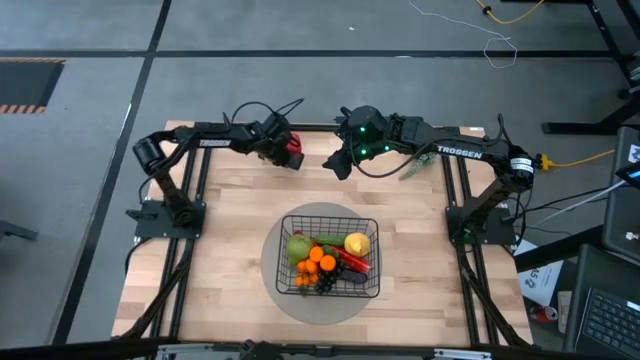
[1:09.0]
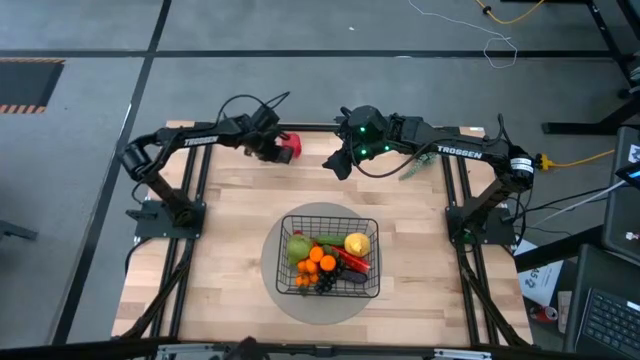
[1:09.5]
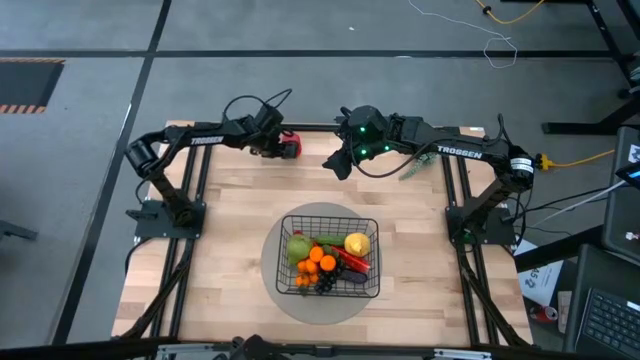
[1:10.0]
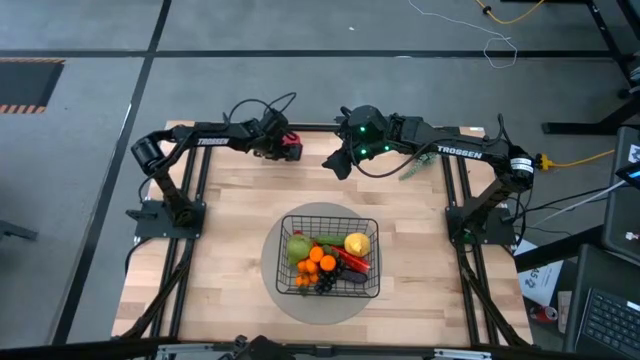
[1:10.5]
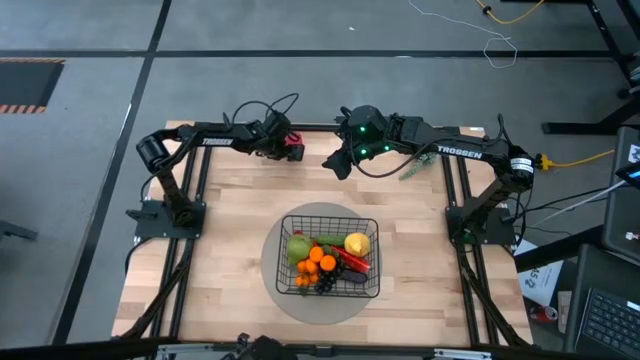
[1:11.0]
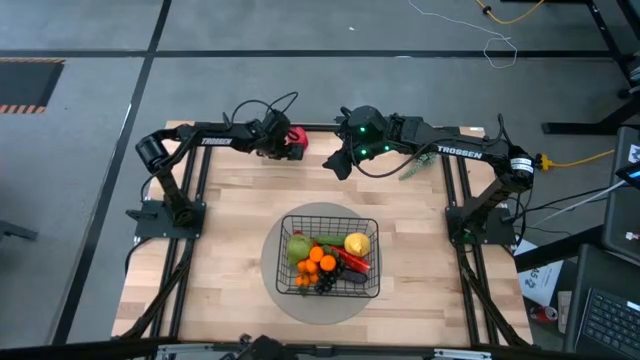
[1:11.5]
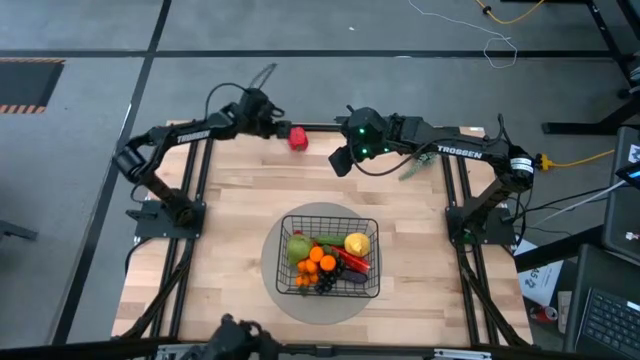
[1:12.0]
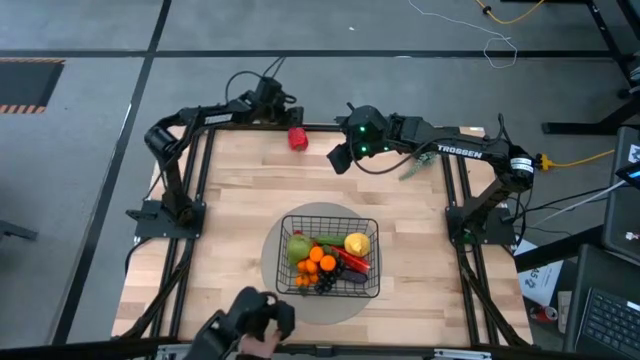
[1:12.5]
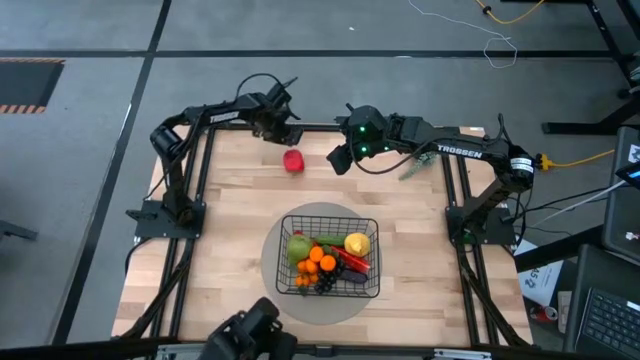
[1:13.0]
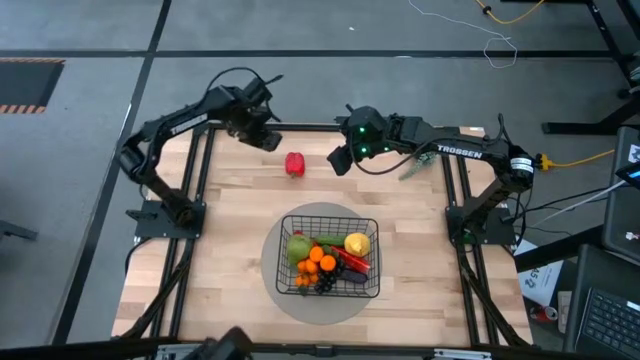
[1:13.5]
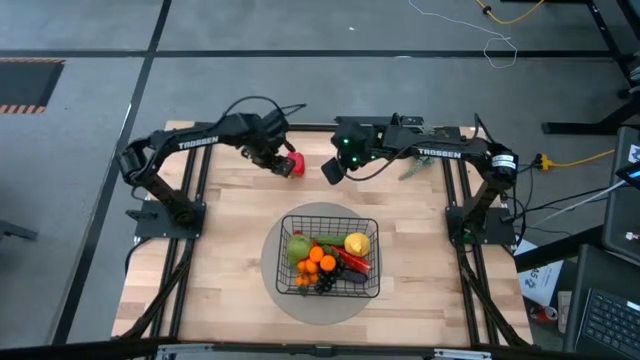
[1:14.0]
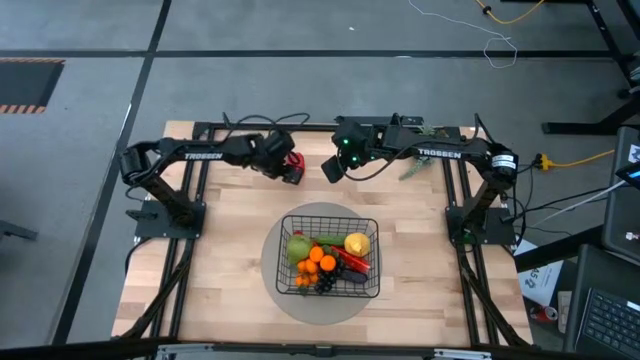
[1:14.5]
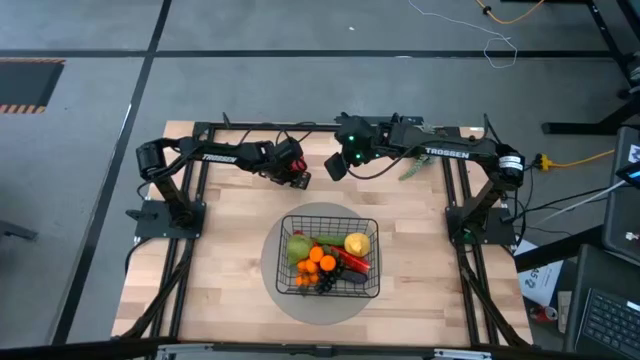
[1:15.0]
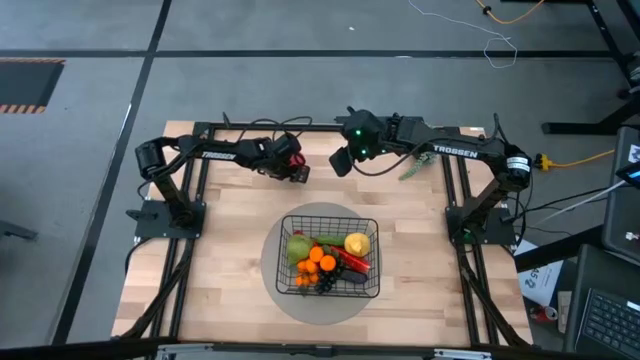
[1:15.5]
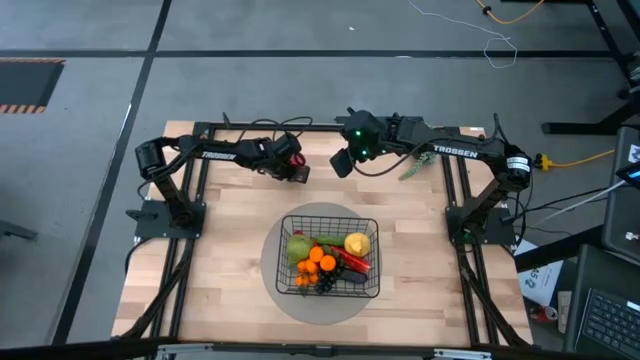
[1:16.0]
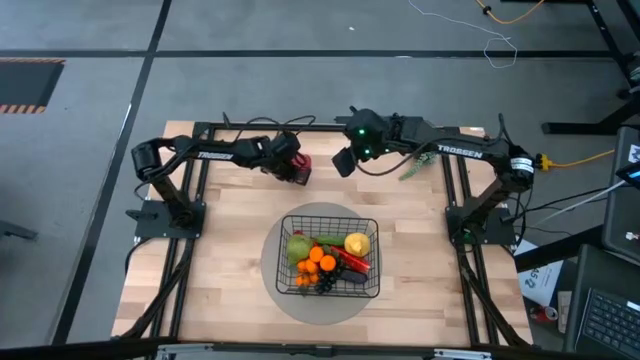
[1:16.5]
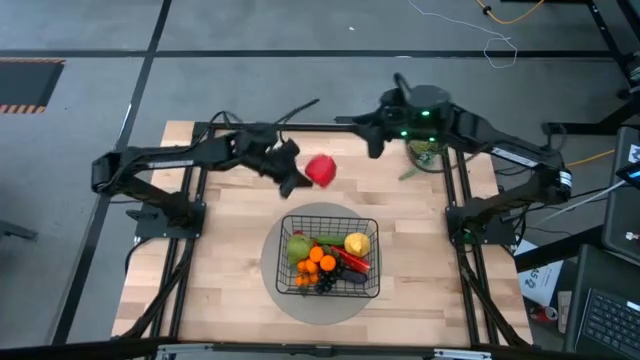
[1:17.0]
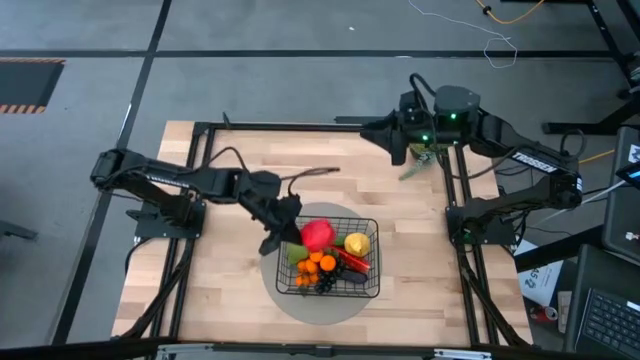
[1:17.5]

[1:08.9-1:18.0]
Task: Build produce basket
Put the red bell pepper into the wire basket

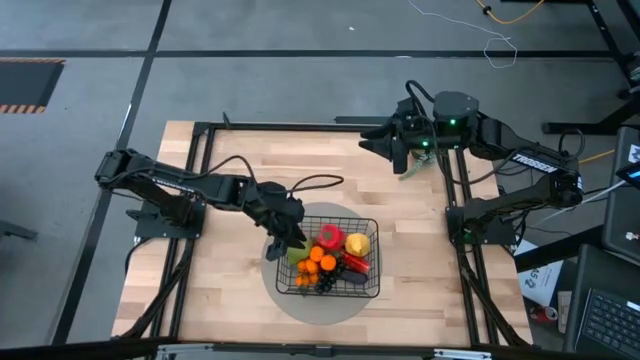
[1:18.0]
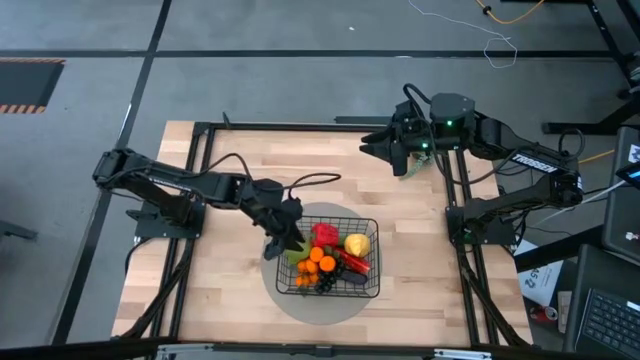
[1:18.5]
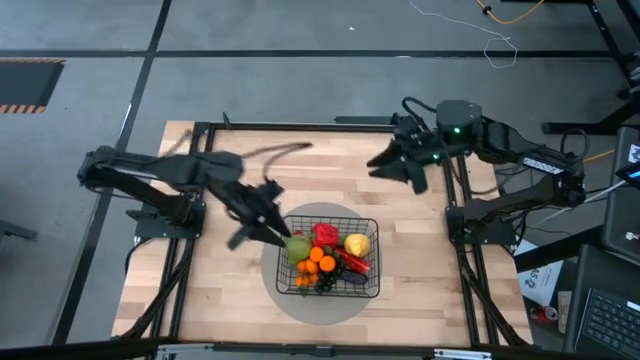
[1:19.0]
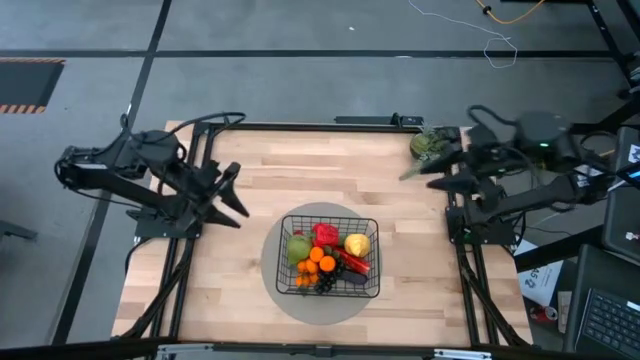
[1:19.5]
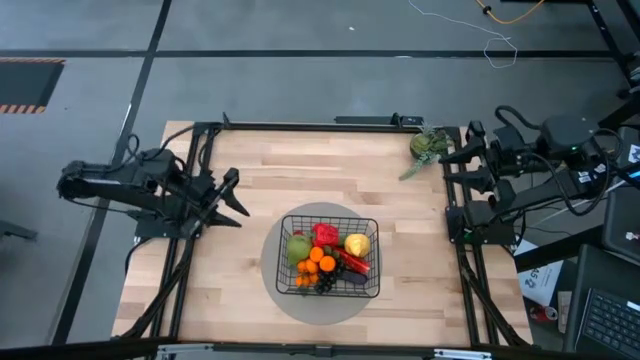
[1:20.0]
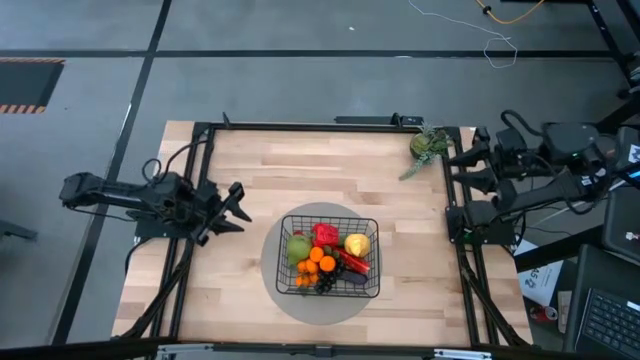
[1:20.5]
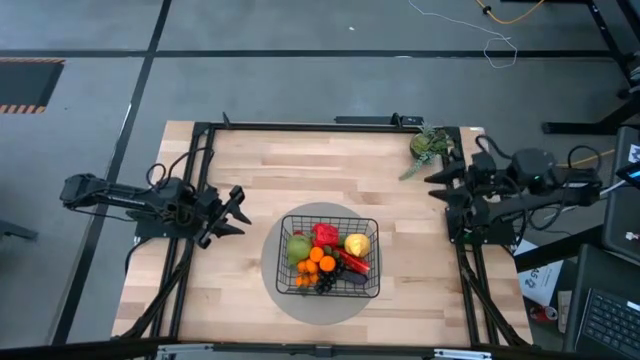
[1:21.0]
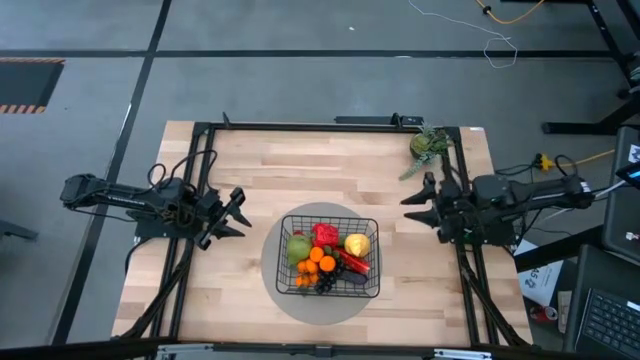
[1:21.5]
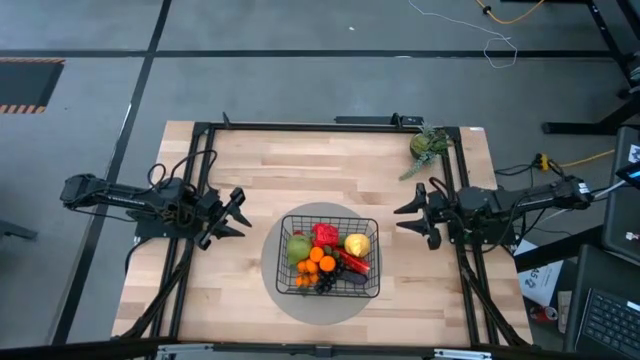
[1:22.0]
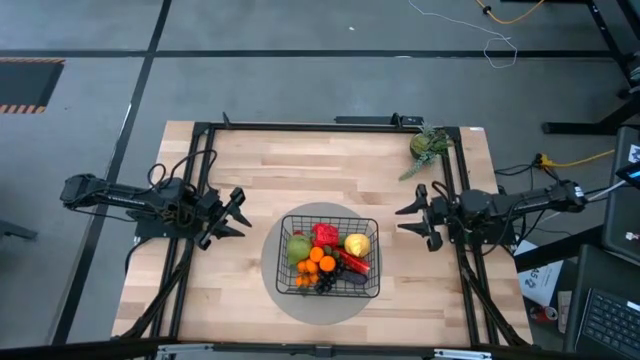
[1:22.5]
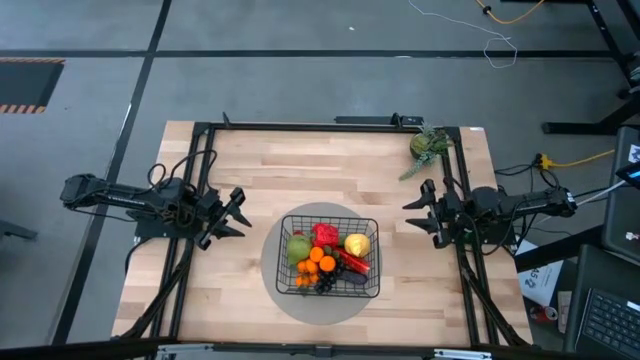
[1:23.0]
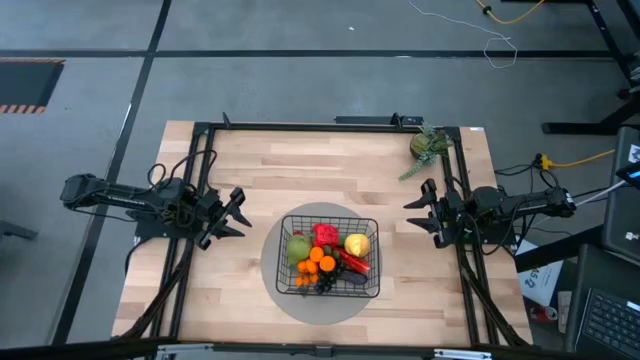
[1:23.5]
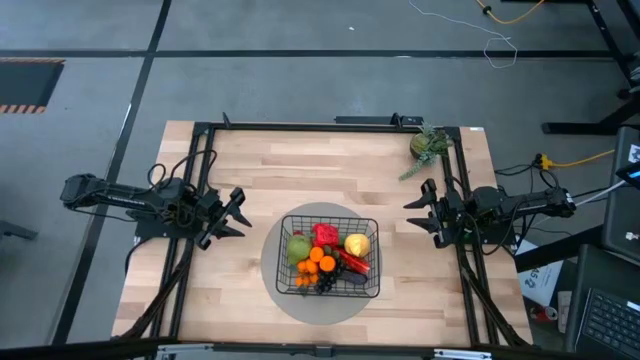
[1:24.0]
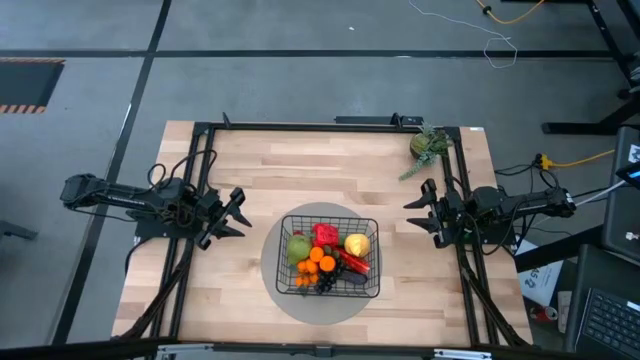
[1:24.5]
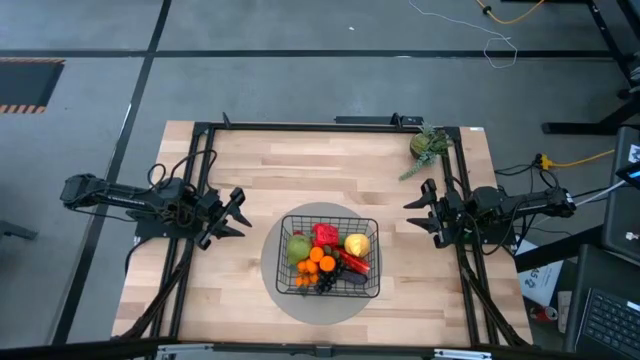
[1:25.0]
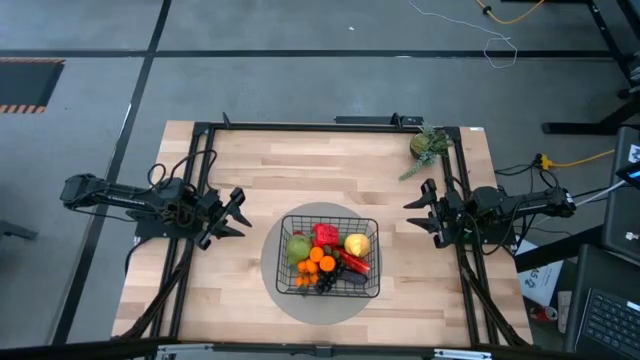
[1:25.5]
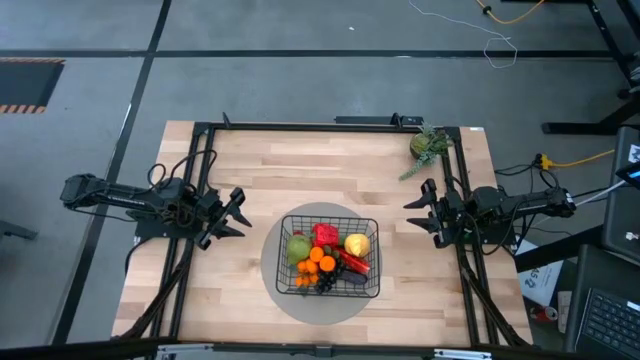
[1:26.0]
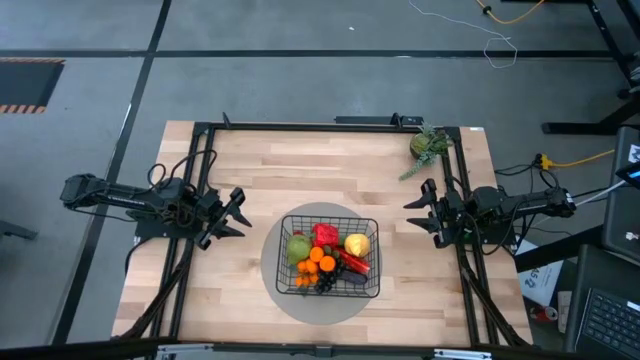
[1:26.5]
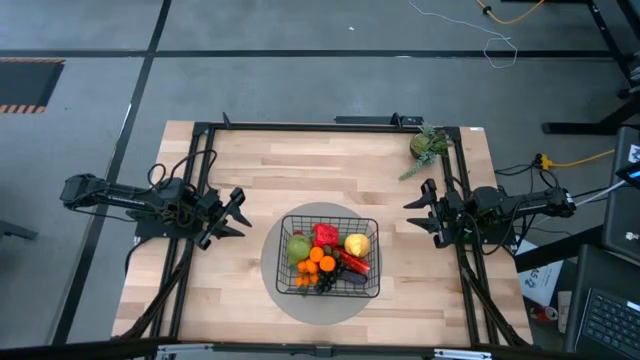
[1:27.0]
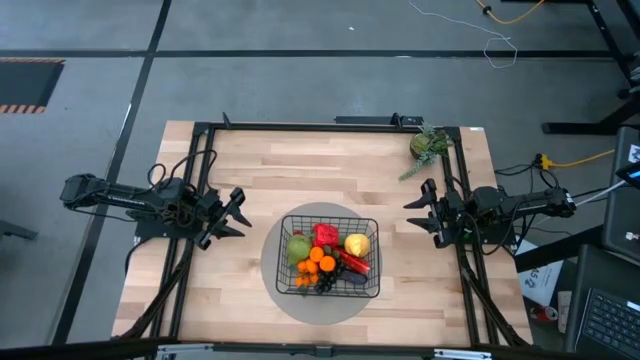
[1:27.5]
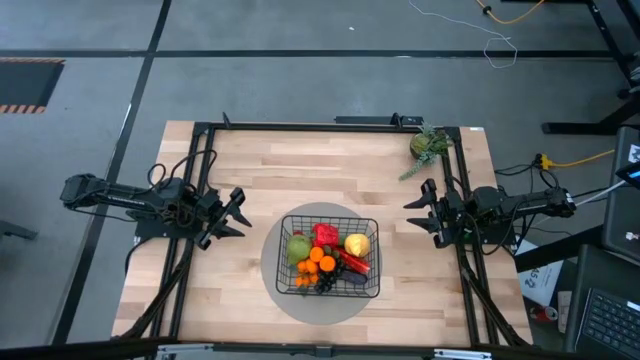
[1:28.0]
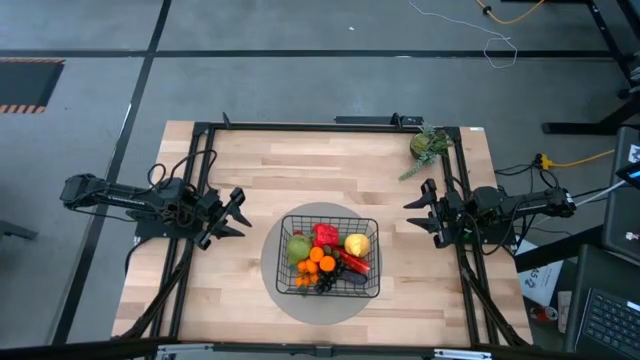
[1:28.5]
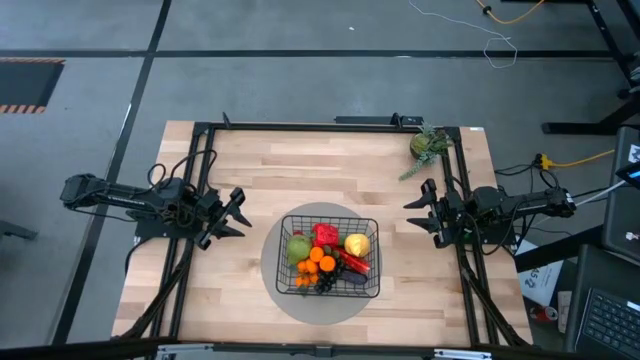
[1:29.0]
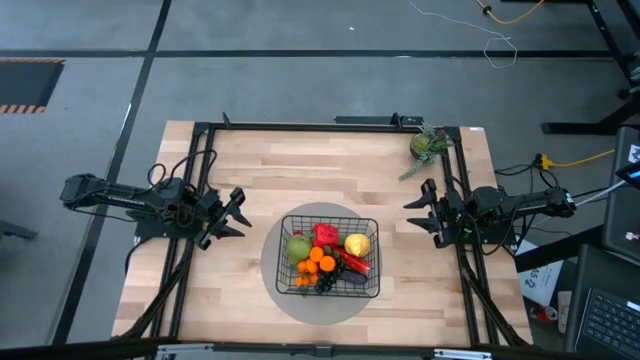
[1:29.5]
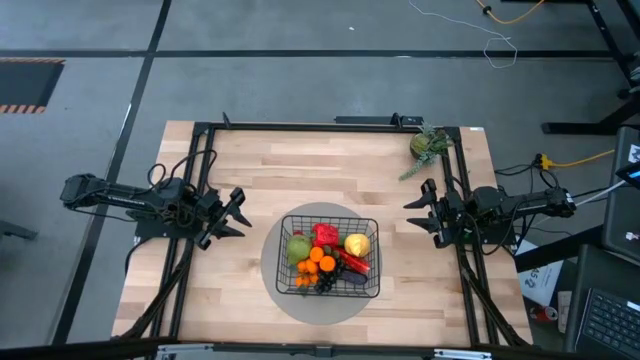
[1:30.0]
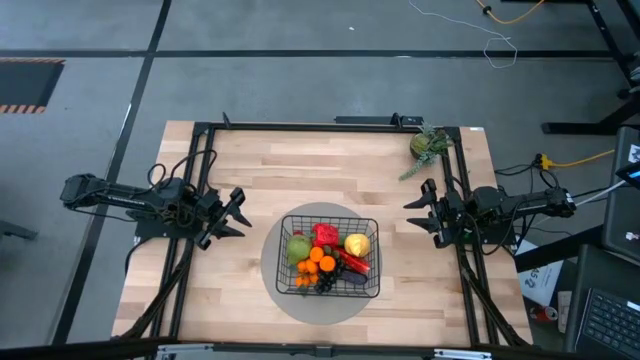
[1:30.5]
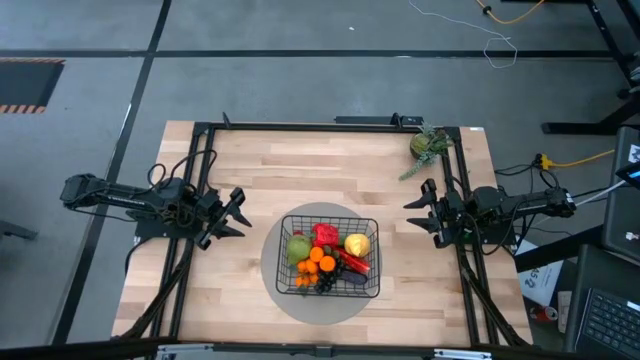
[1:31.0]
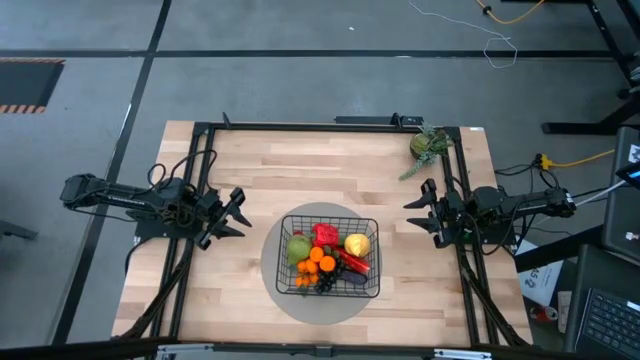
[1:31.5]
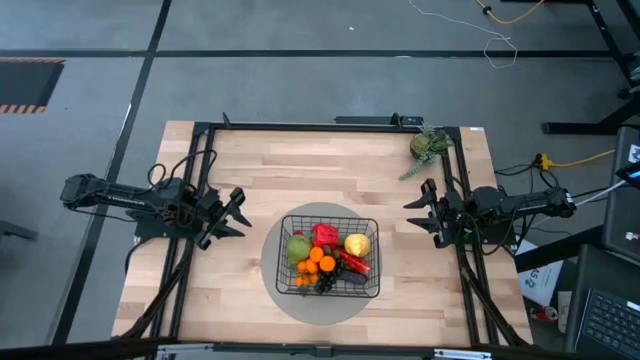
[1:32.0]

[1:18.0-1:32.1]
Return to Home Position
